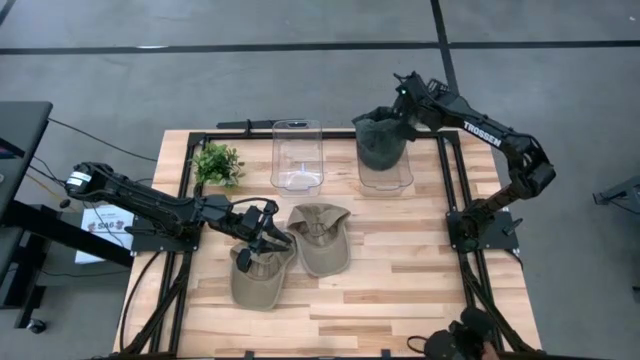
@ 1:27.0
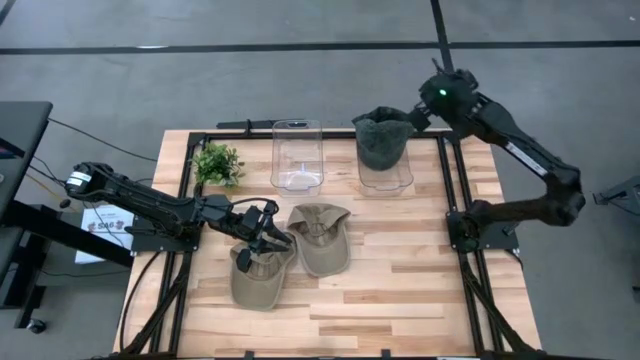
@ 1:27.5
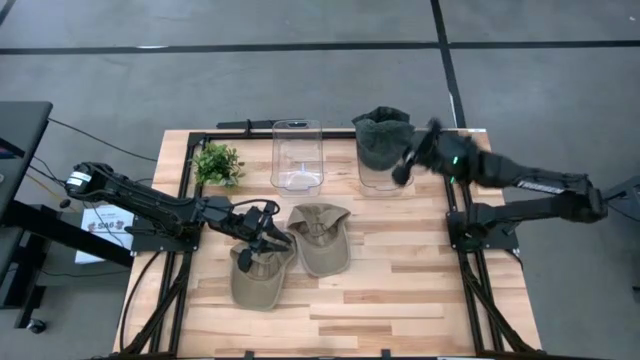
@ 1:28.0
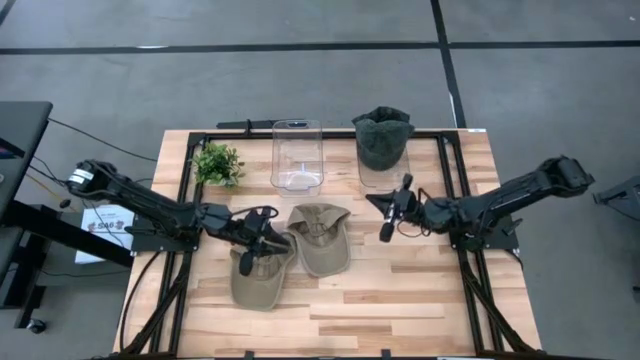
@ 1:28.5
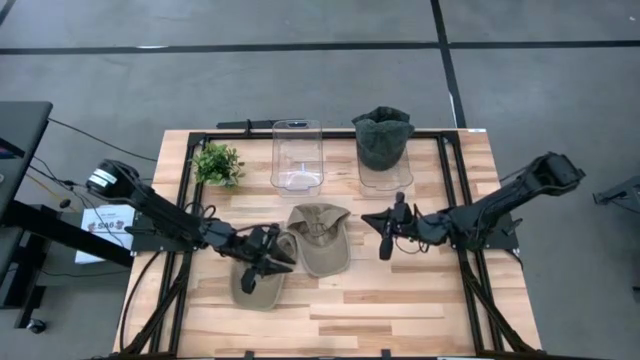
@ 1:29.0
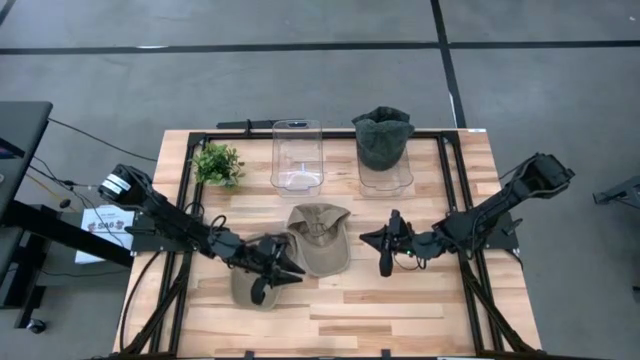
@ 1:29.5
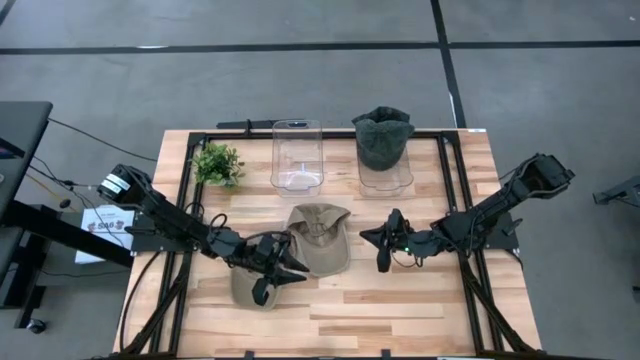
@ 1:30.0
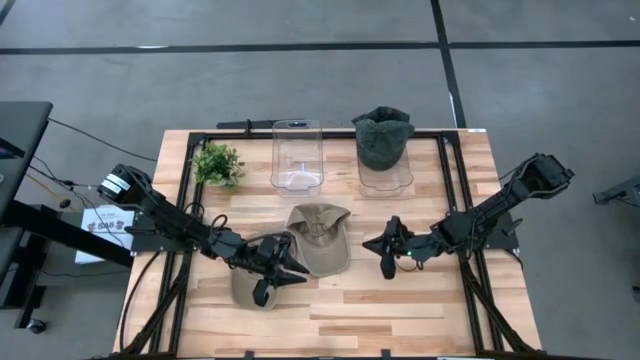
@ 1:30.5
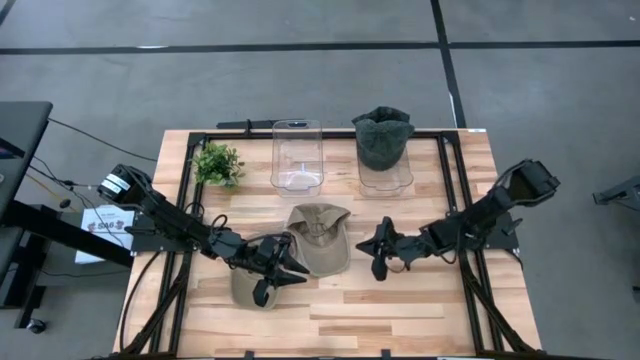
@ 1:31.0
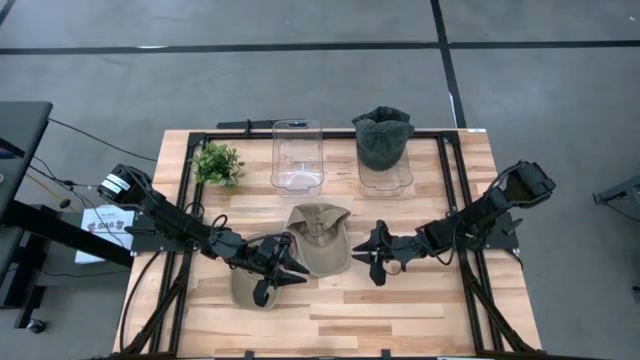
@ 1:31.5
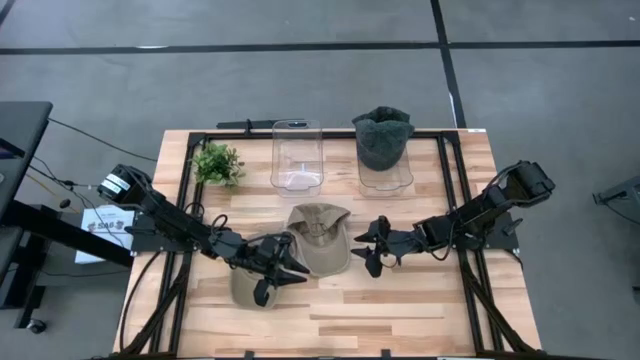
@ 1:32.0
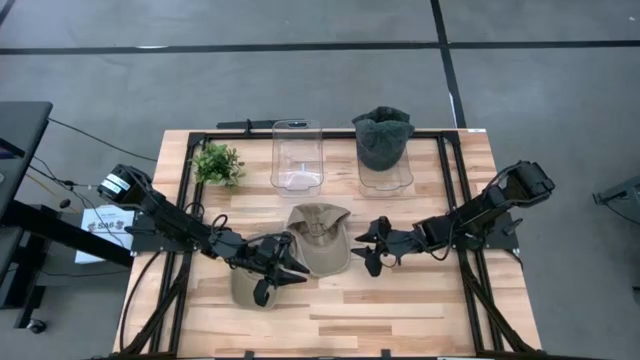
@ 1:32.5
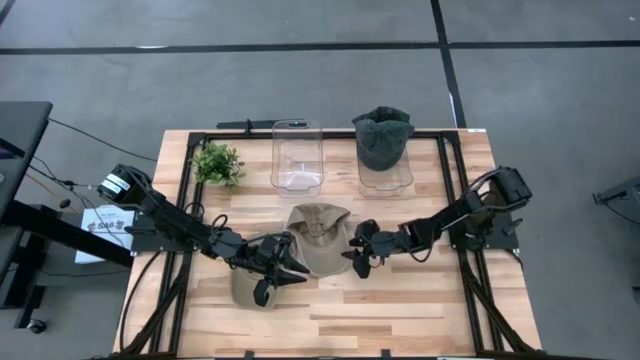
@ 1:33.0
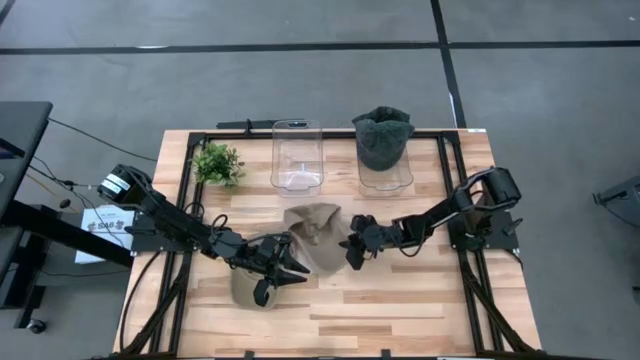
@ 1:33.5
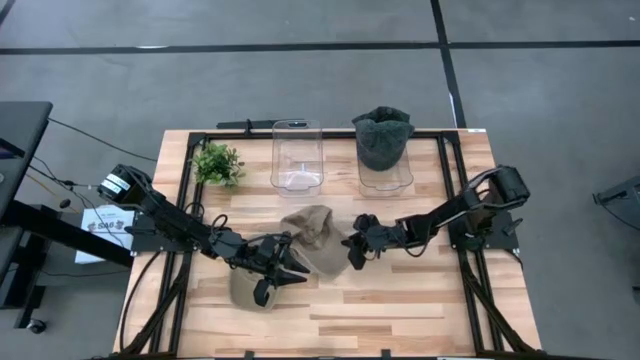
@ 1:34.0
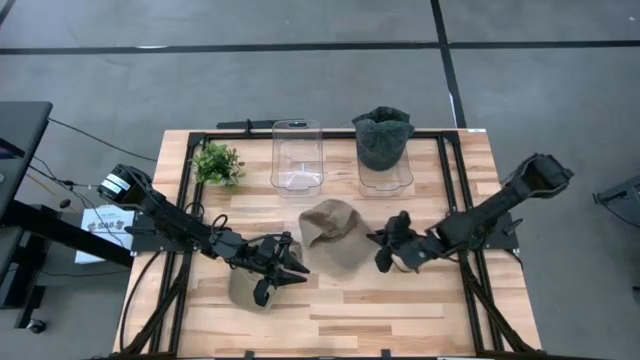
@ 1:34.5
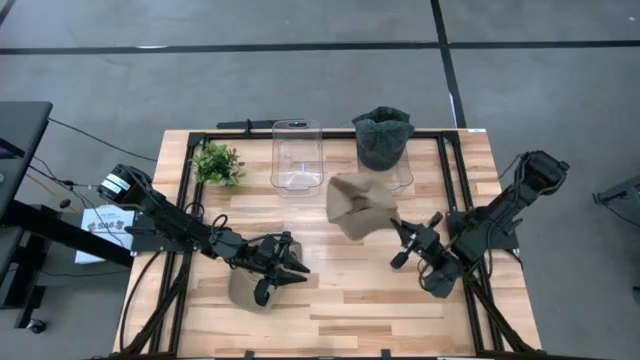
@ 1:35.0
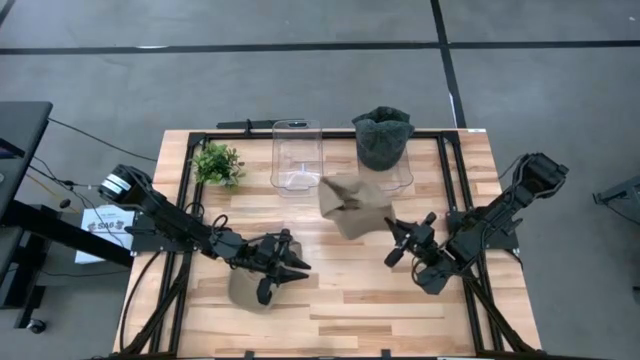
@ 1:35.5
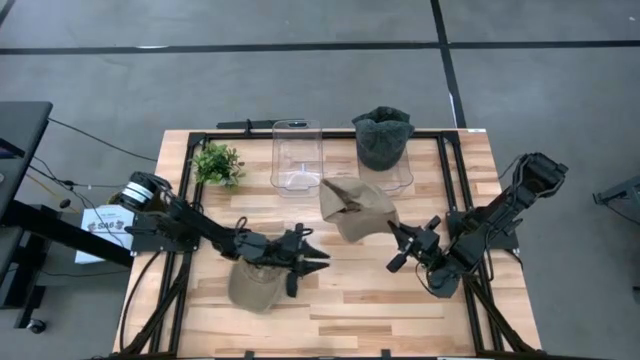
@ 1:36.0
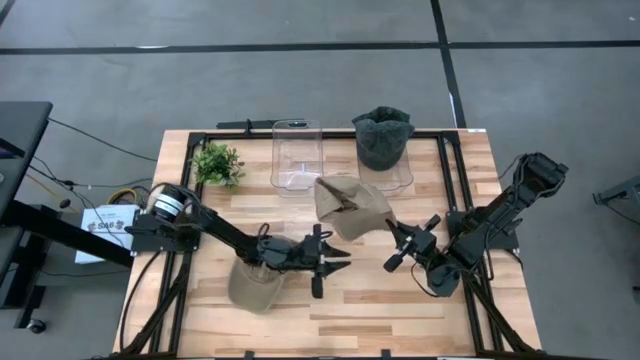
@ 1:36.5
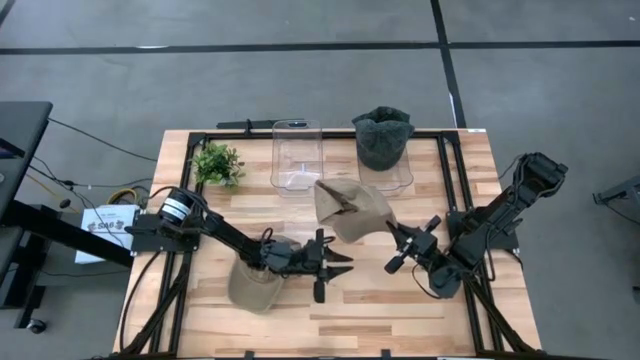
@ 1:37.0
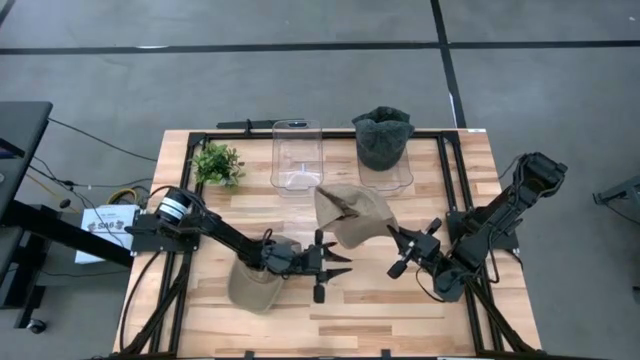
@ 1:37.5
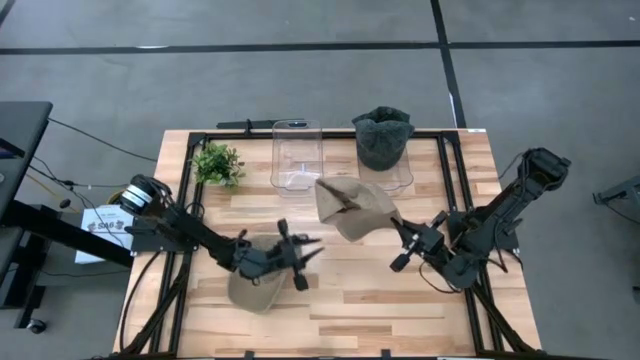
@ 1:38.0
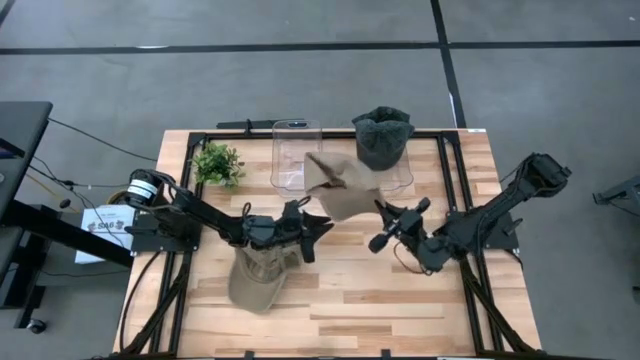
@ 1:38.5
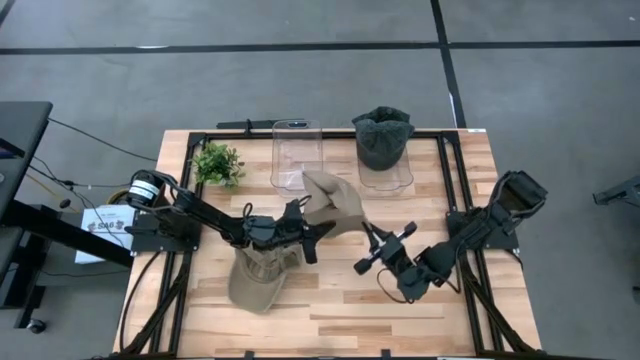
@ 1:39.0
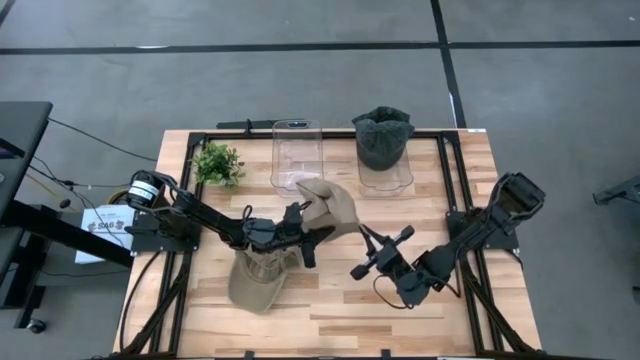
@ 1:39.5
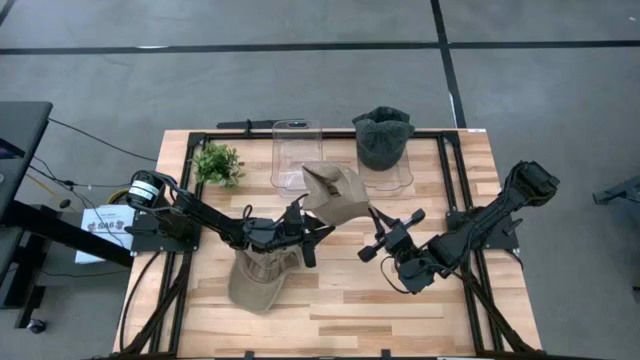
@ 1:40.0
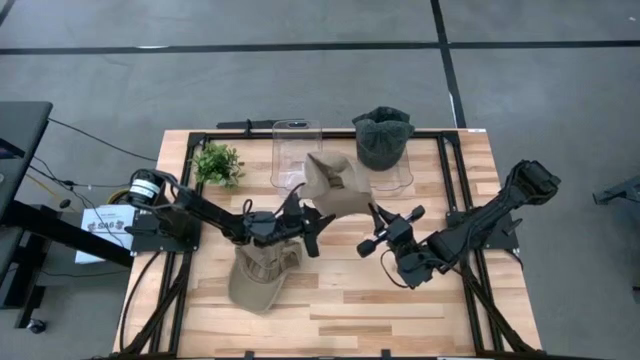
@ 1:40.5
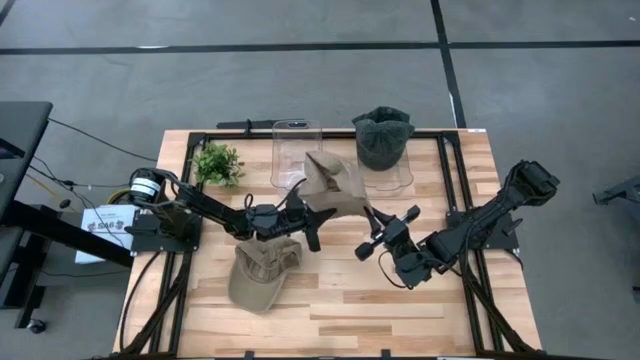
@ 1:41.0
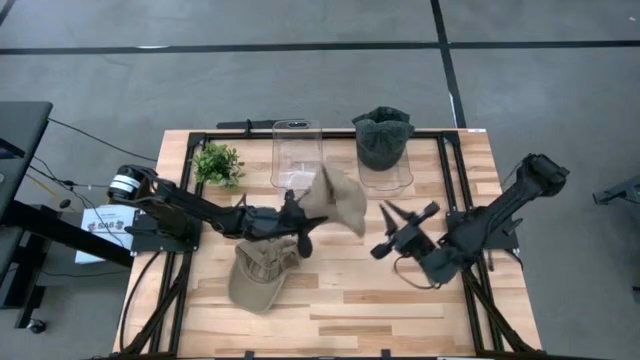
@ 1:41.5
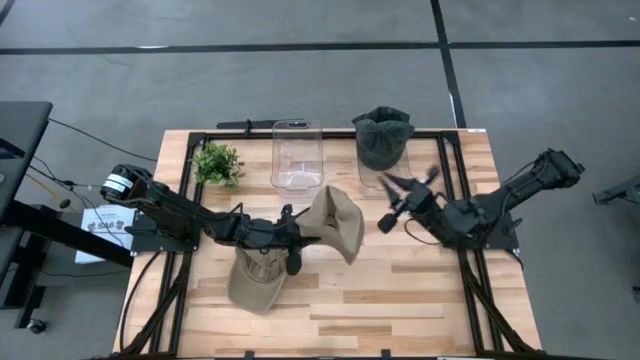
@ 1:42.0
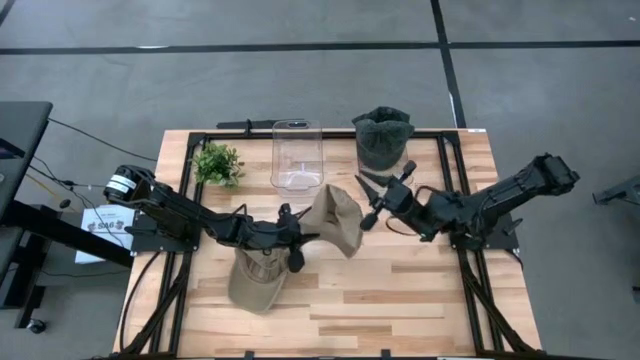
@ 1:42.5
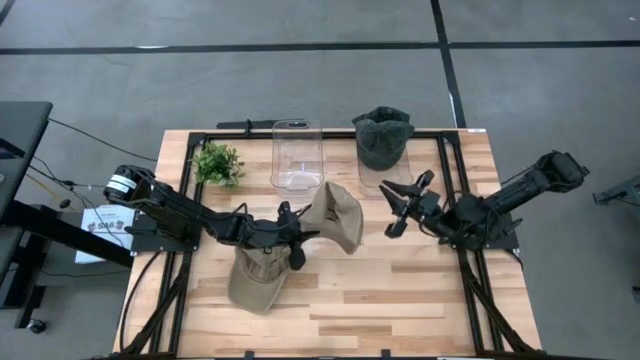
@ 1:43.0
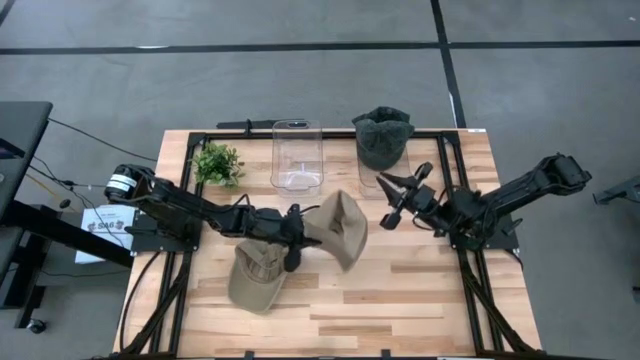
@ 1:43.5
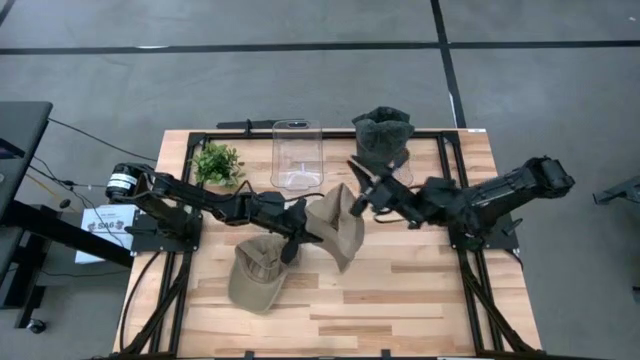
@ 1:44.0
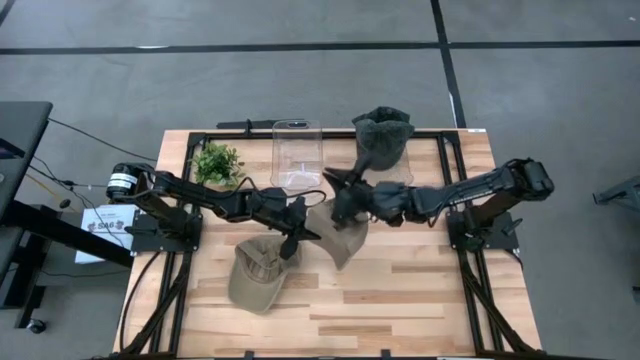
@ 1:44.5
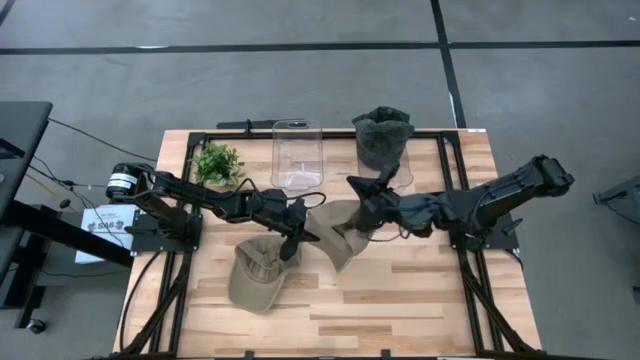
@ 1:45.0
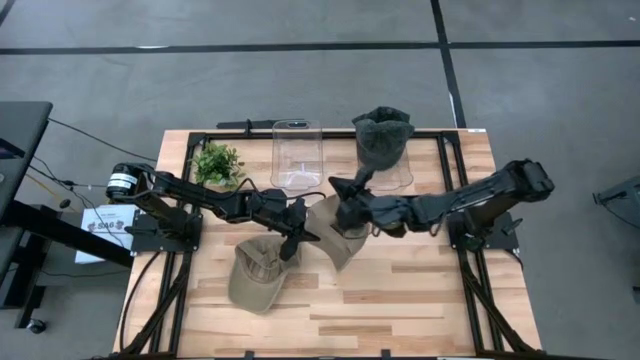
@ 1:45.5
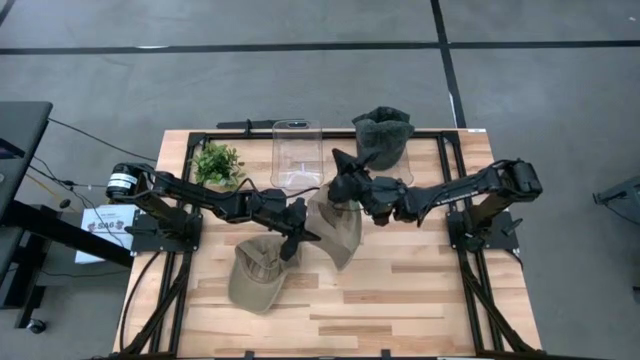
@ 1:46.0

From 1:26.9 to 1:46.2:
Task: Pick & Place hat
Put the right brown cap into the left transparent bin

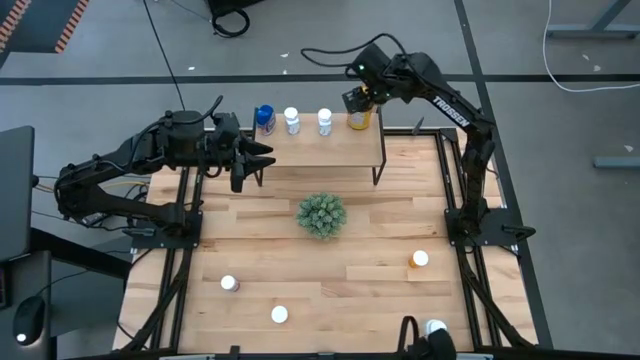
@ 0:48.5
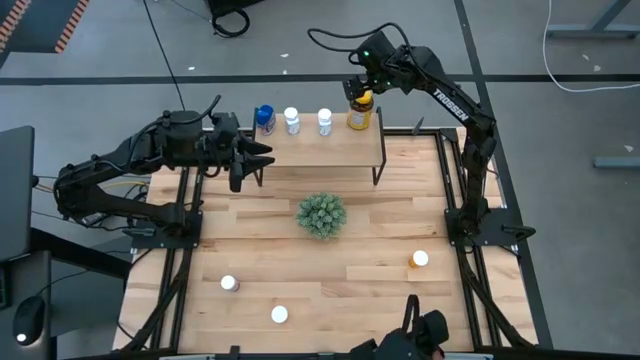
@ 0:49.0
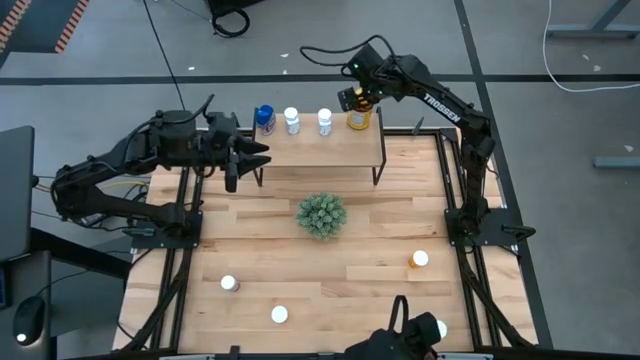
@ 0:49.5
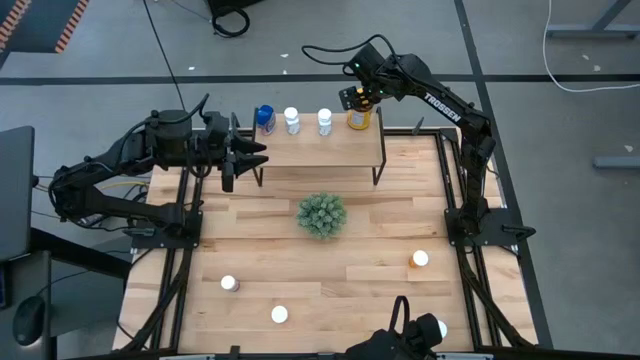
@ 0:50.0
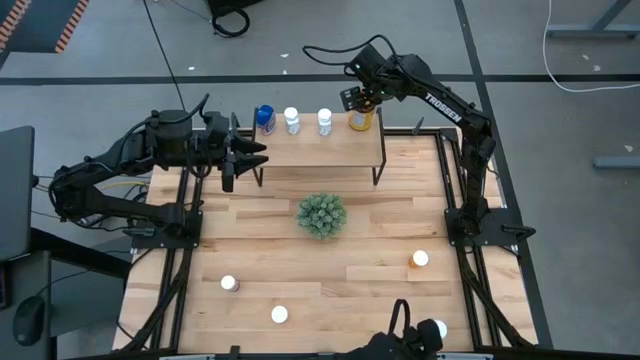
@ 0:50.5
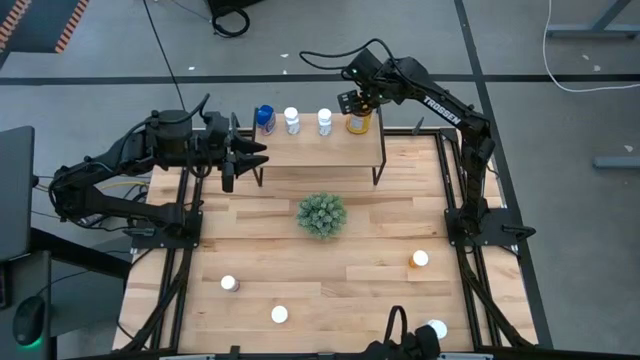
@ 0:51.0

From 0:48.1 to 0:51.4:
Task: Pick and place medicine bottles onto shelf by color
Adjust the yellow medicine on the shelf
